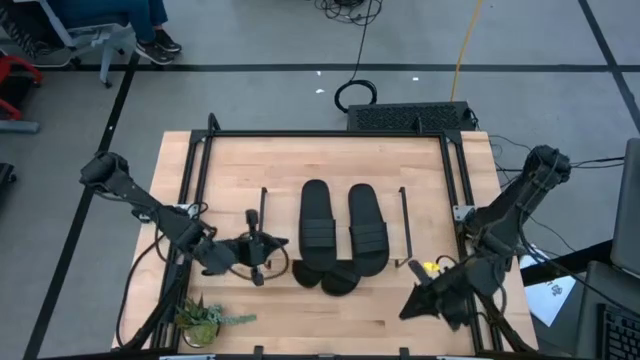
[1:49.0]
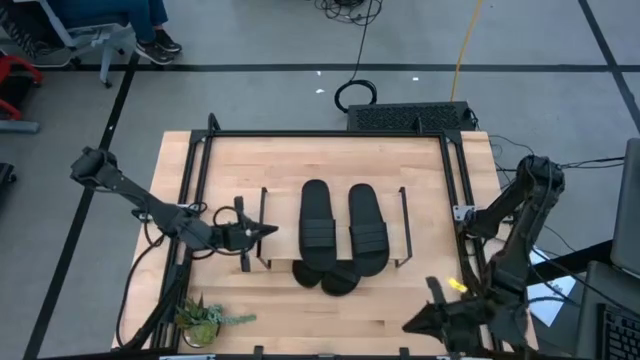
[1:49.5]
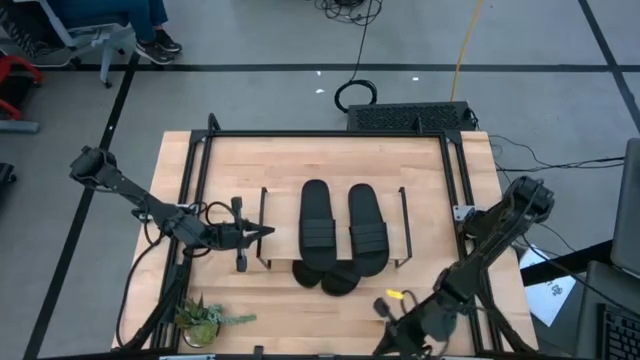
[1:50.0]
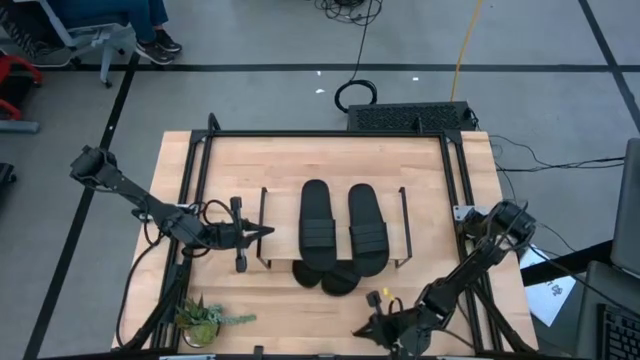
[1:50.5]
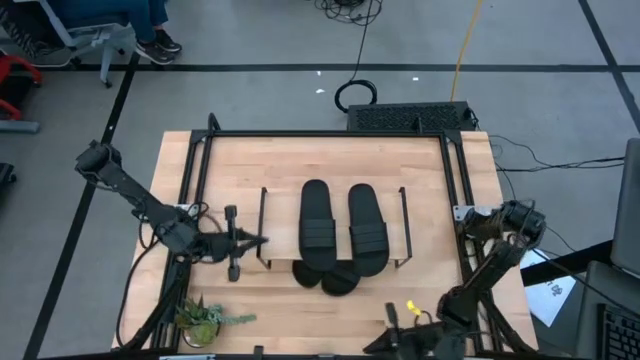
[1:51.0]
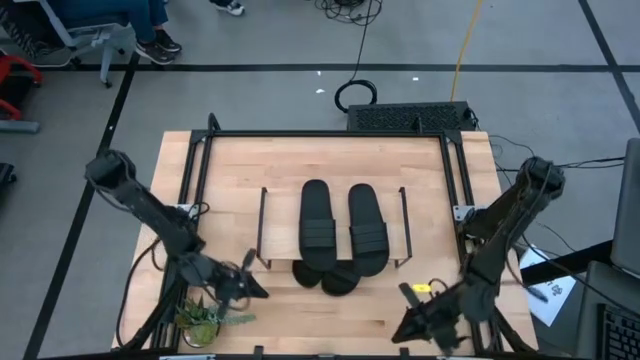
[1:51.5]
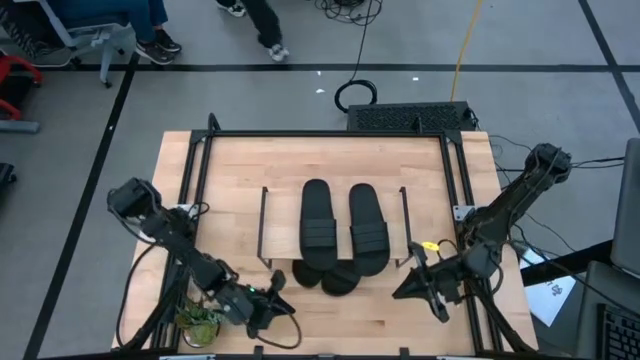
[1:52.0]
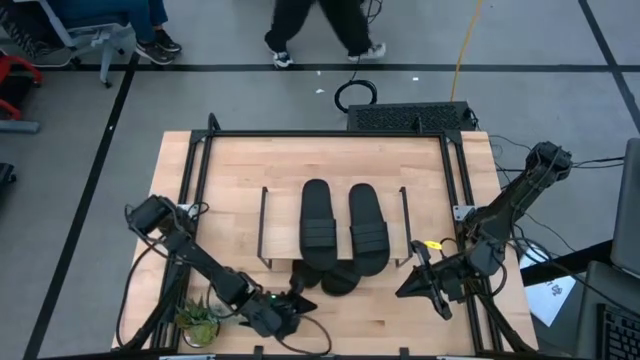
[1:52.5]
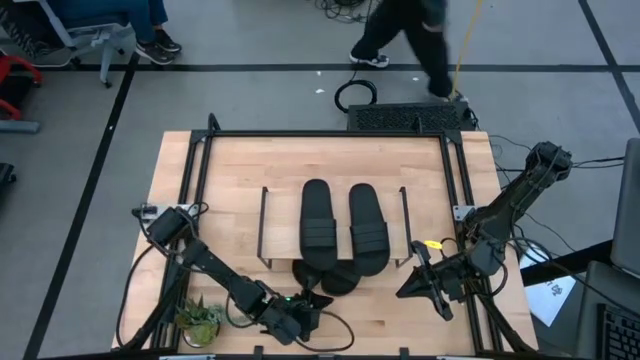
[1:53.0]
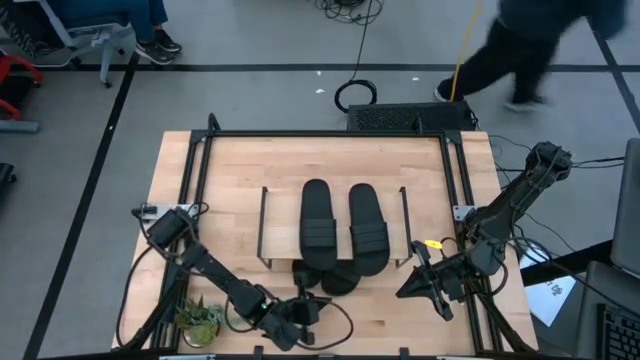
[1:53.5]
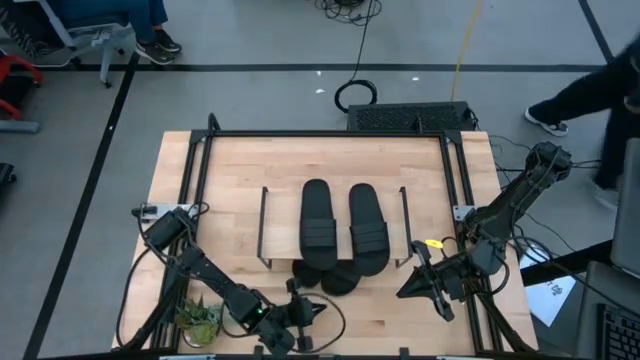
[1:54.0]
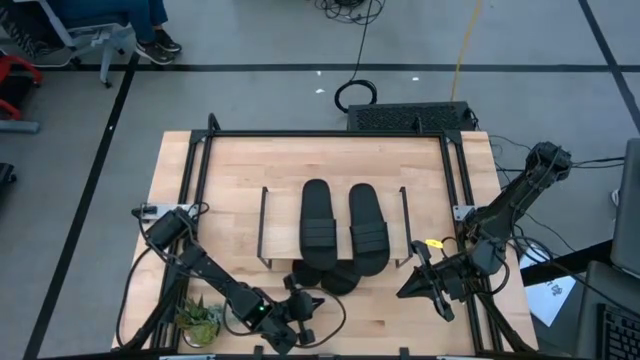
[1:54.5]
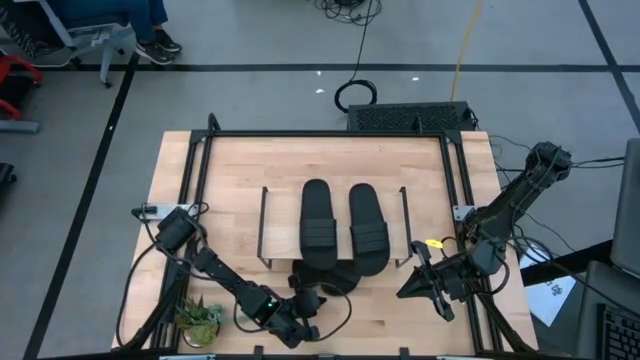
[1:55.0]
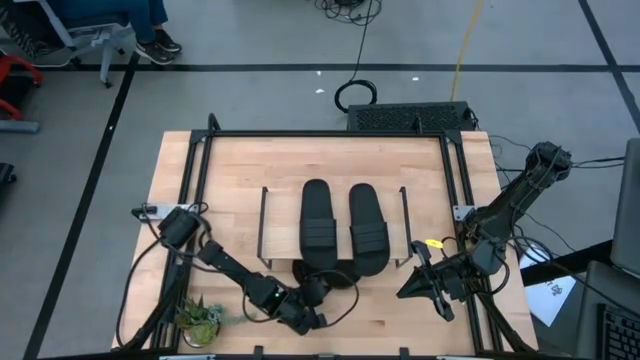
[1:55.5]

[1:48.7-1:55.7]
Task: Pick and place slides into the shelf
Adjust the bottom right black slipper under the shelf

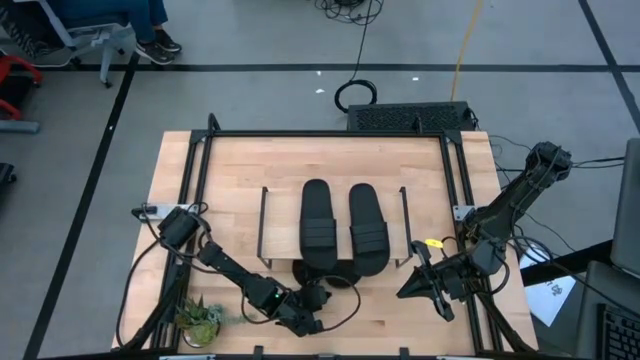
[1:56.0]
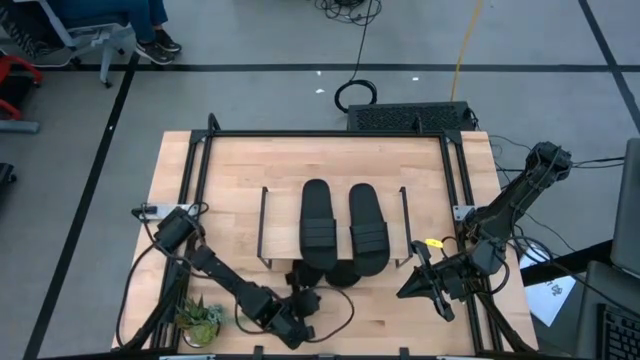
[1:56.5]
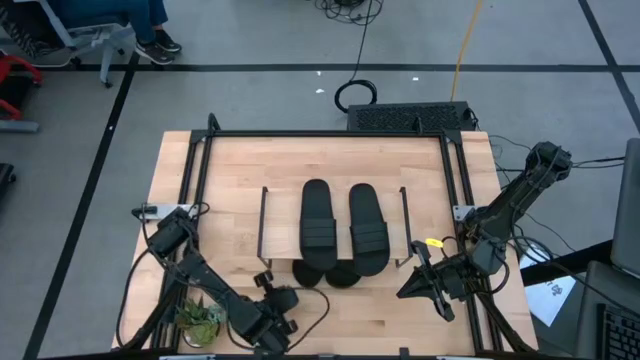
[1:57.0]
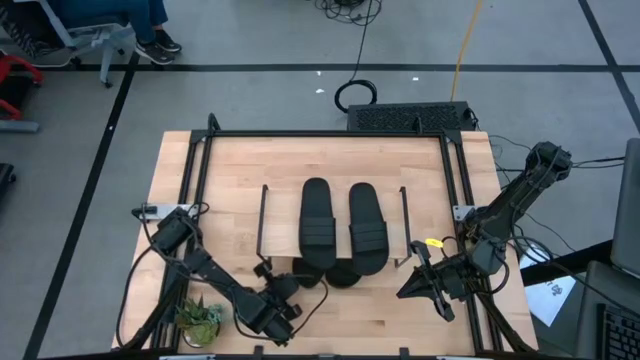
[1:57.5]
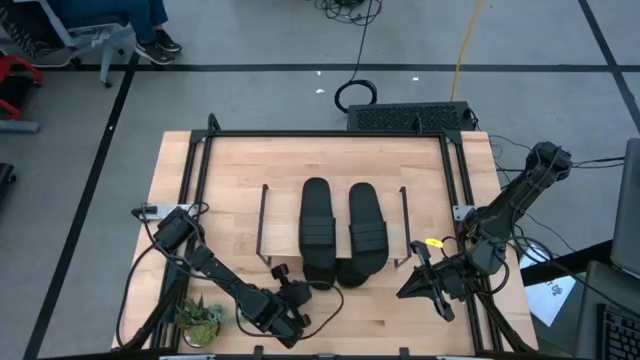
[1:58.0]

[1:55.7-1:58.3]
Adjust the bottom left black slipper under the shelf

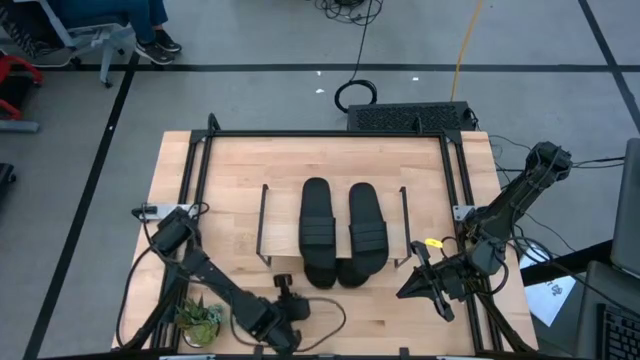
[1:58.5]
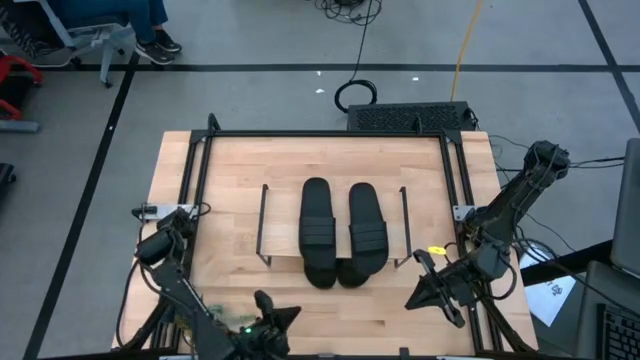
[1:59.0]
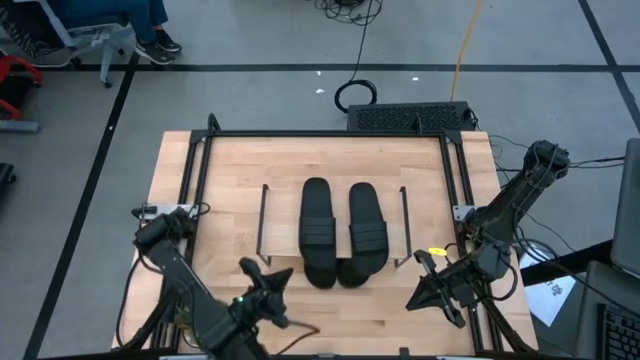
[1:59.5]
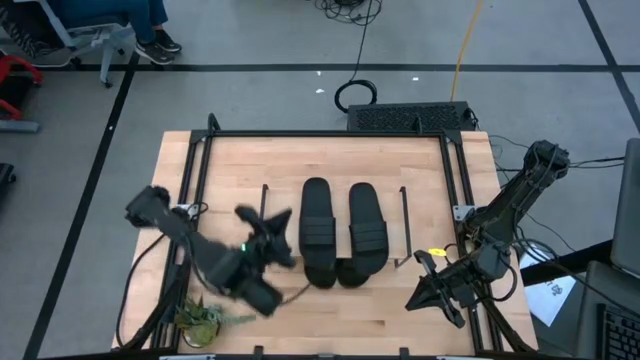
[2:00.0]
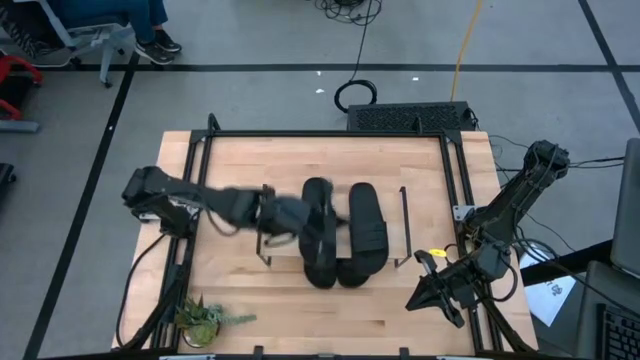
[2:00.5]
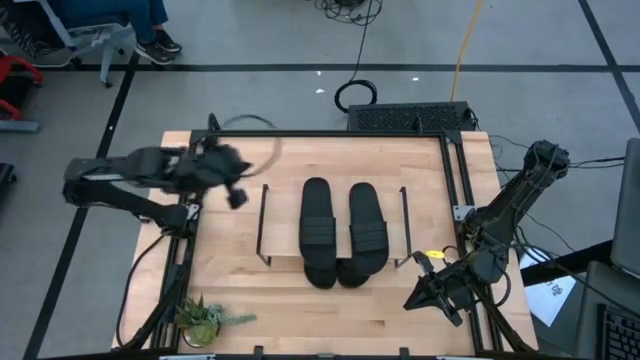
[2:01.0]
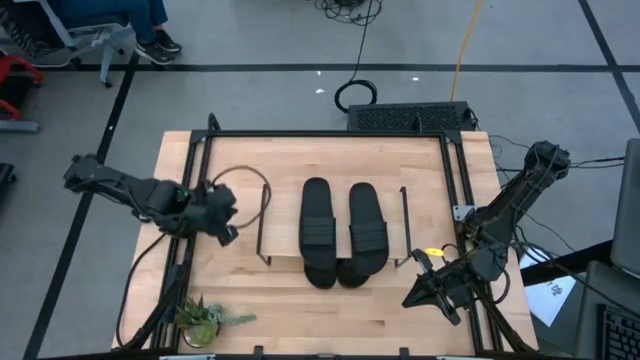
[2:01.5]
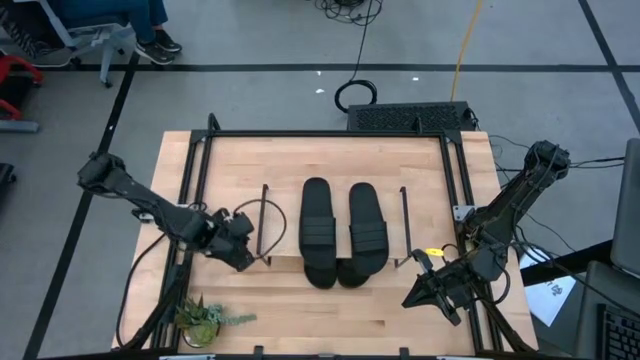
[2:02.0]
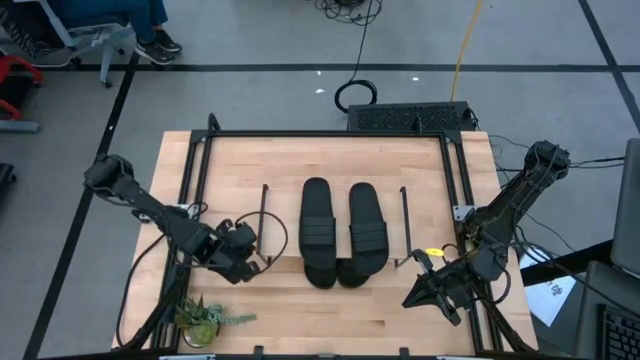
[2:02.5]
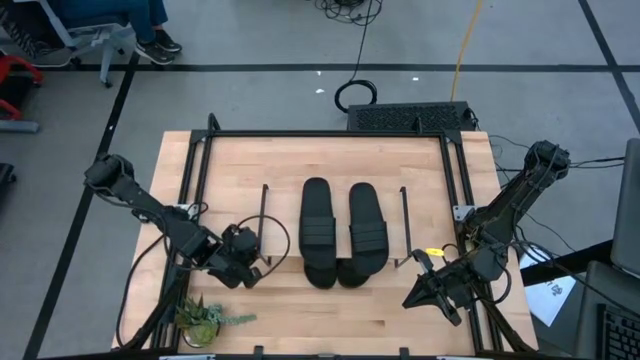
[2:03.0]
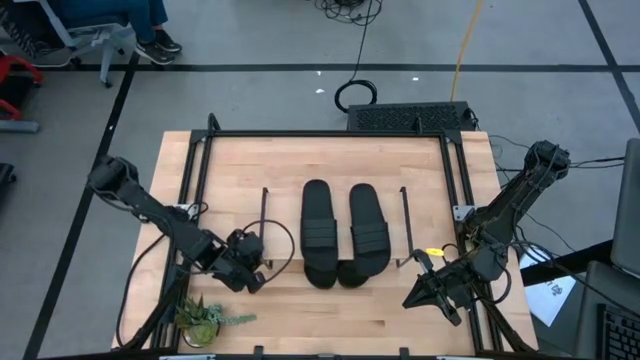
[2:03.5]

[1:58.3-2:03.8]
Adjust the shelf

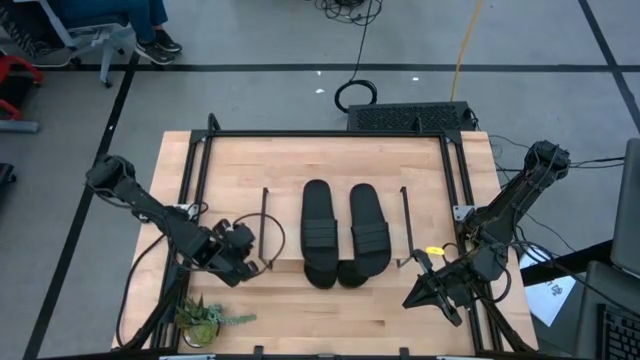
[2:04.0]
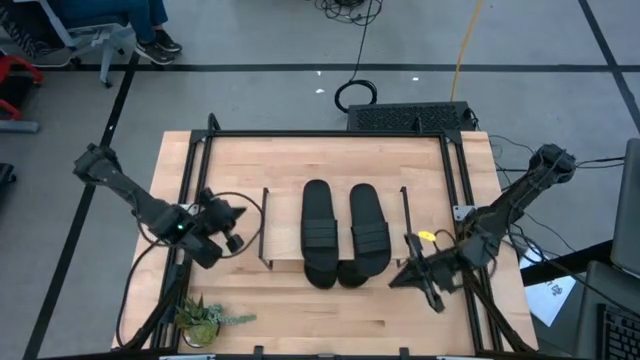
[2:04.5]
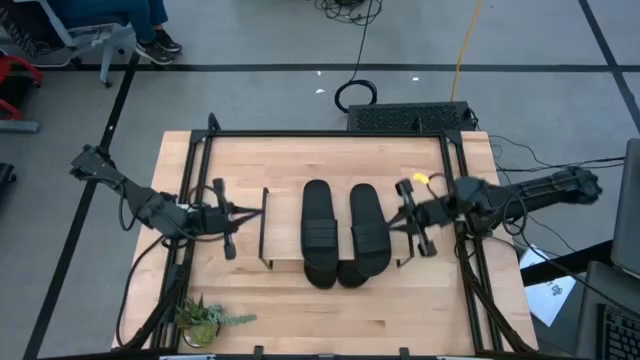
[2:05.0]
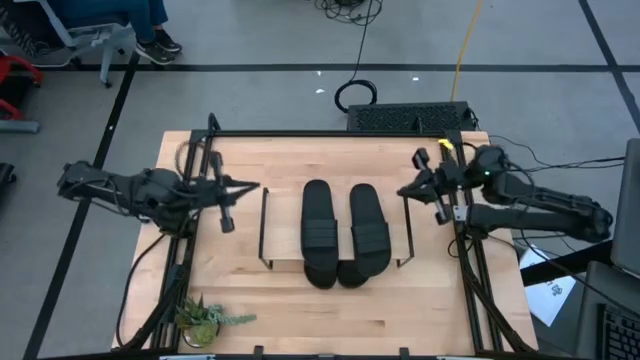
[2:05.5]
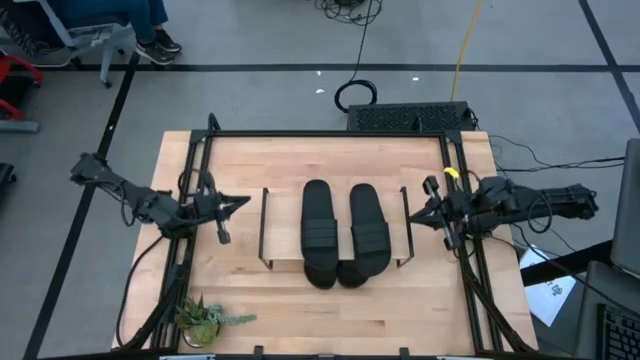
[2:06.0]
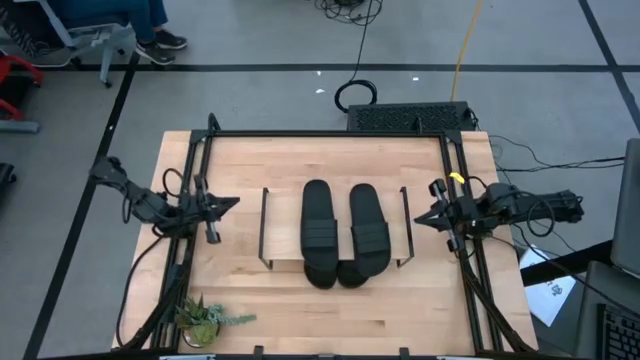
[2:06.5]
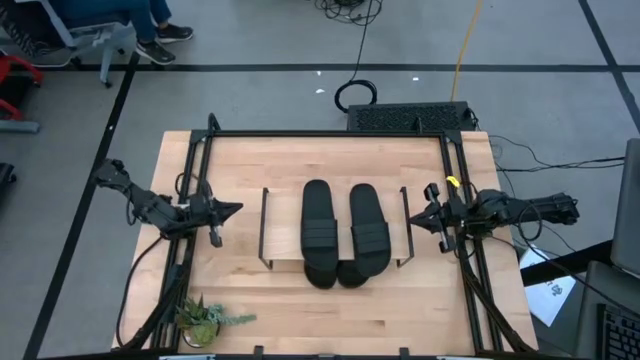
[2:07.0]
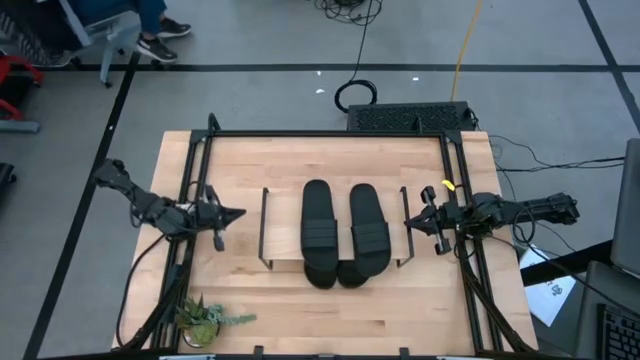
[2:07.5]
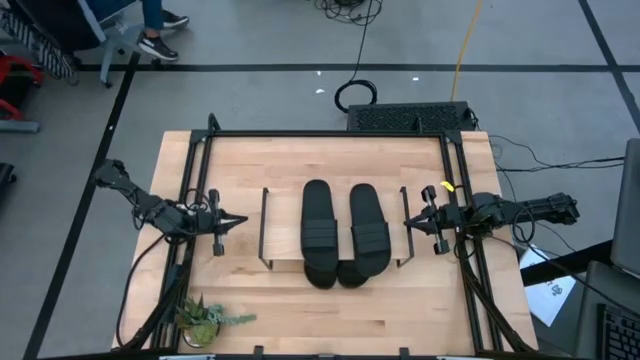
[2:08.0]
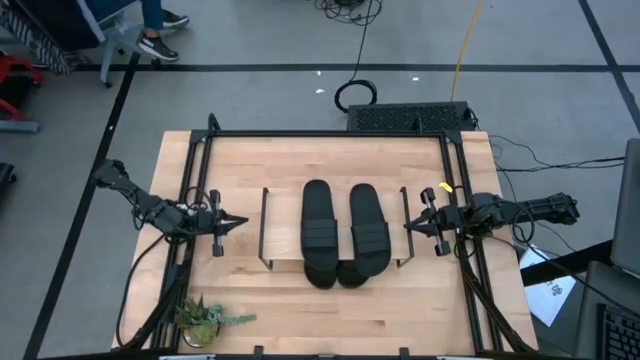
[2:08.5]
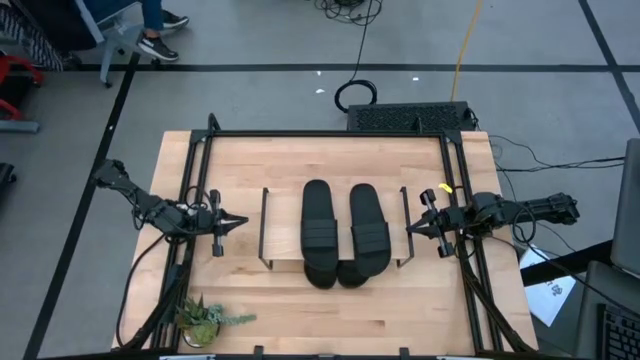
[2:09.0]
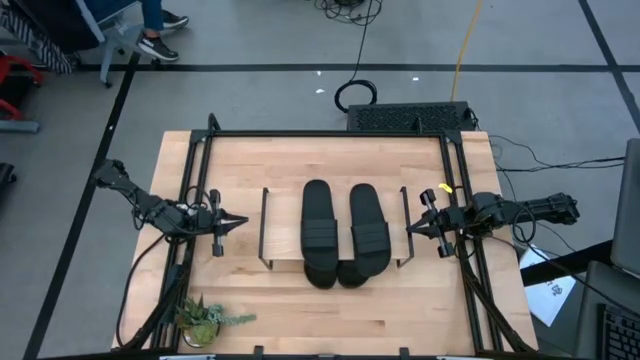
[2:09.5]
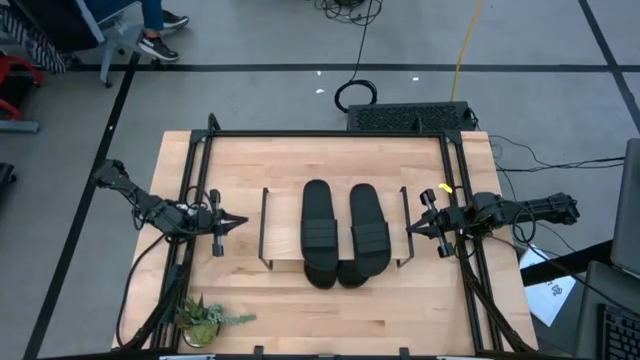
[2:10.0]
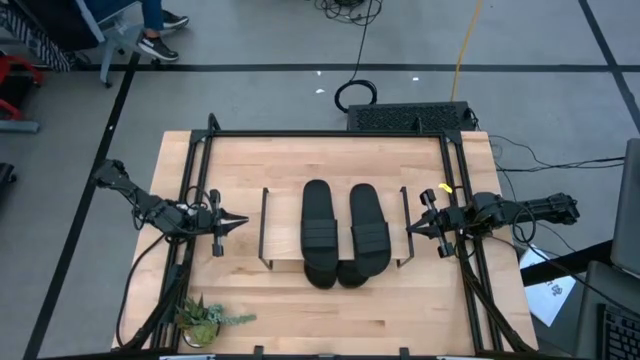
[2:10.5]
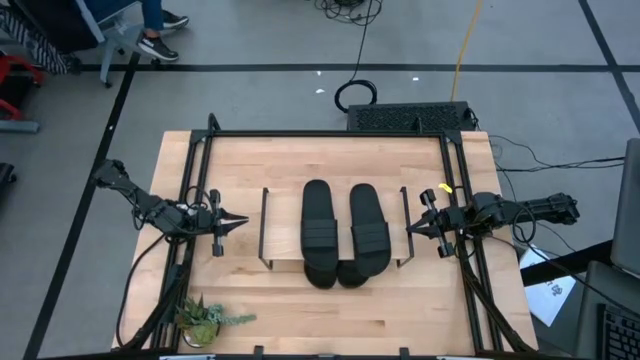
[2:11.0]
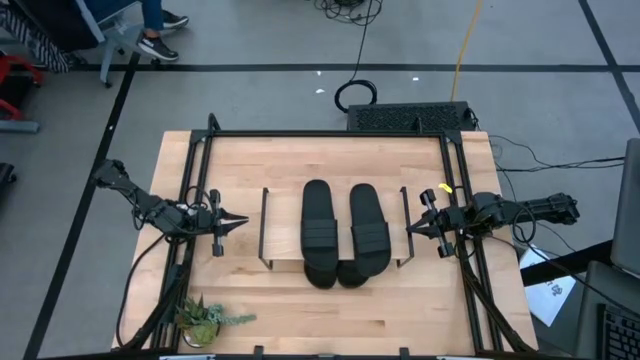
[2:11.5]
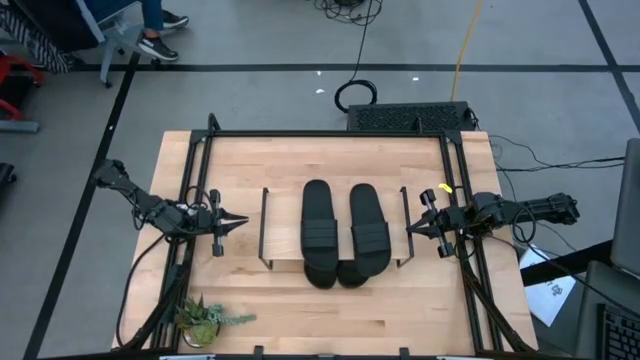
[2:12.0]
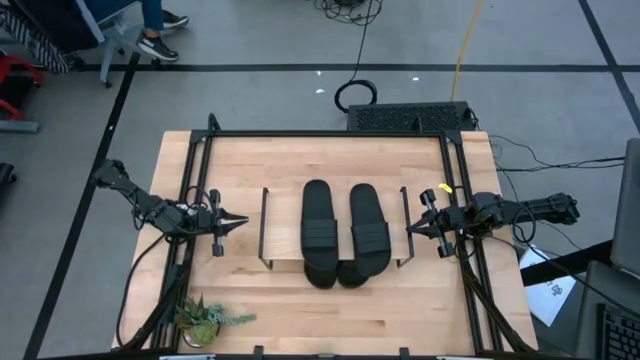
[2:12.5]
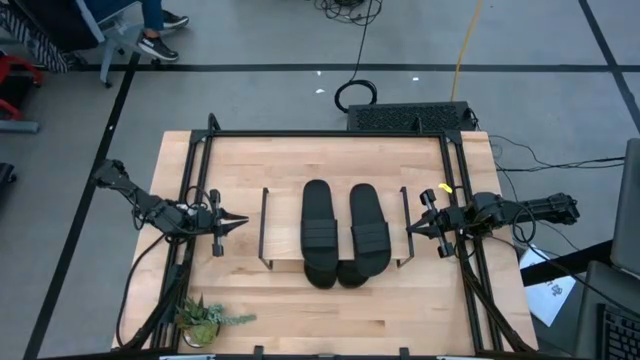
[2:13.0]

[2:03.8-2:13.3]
Return to home position
